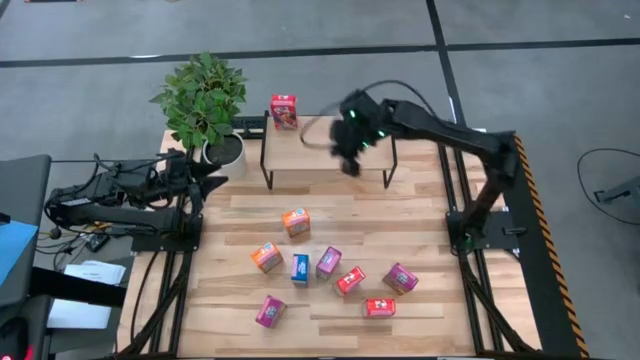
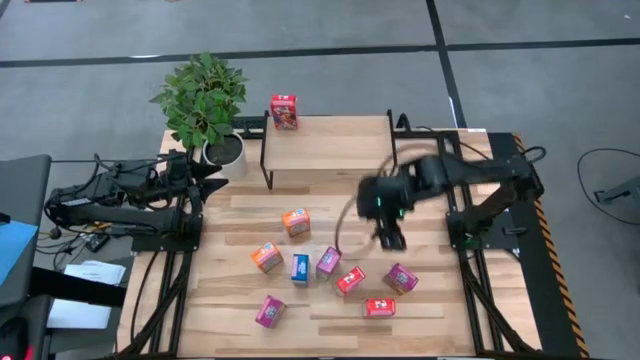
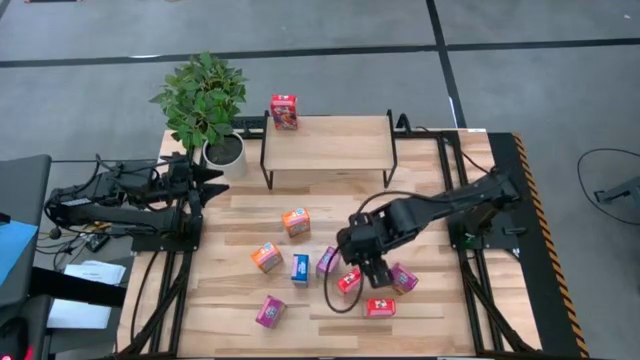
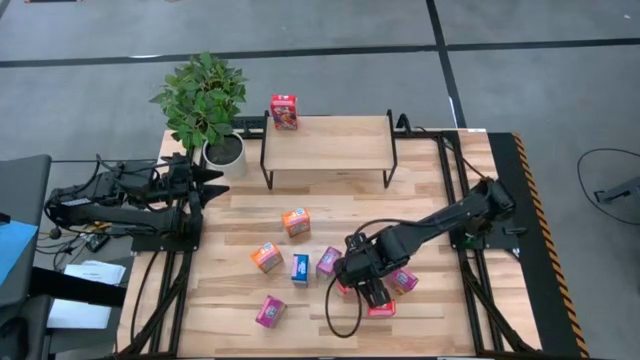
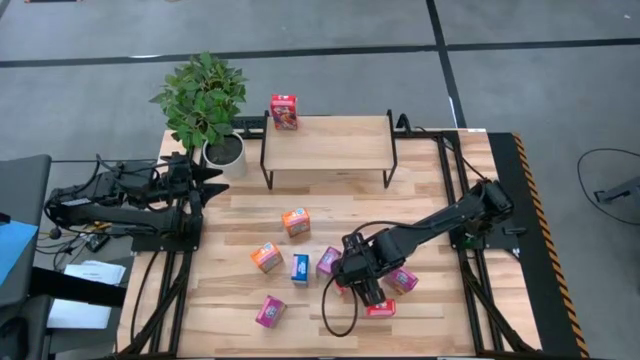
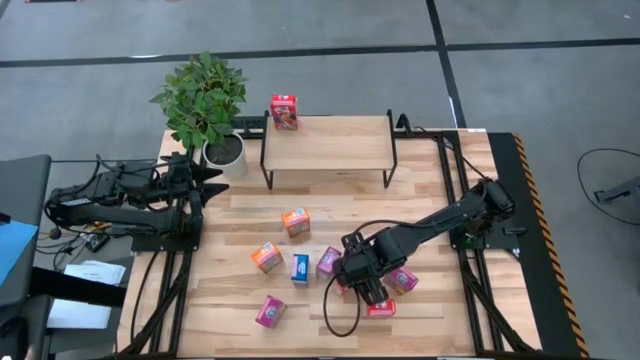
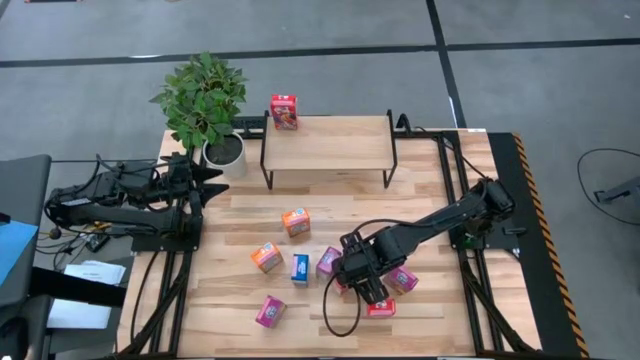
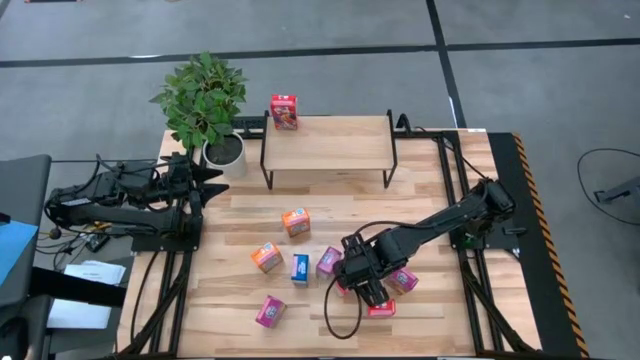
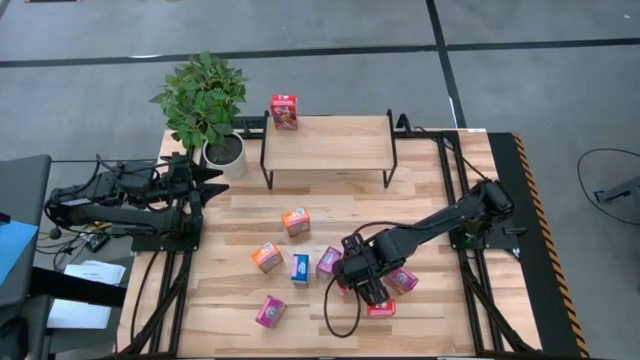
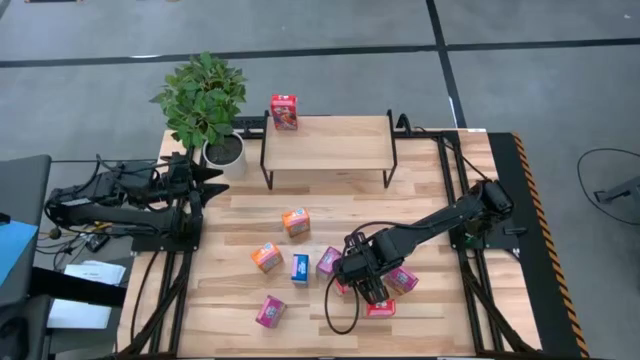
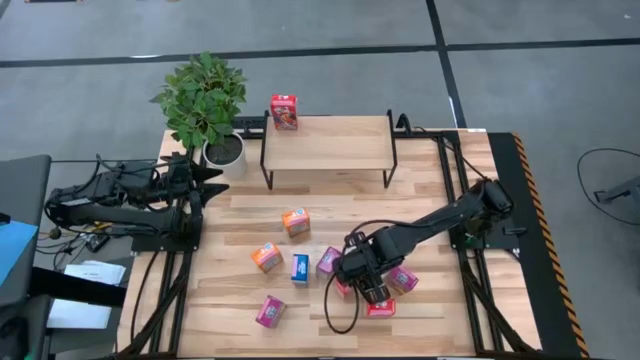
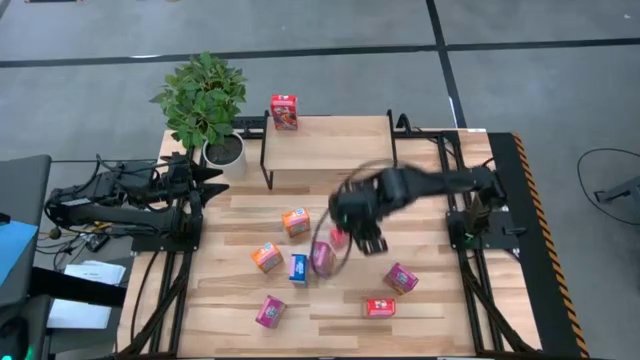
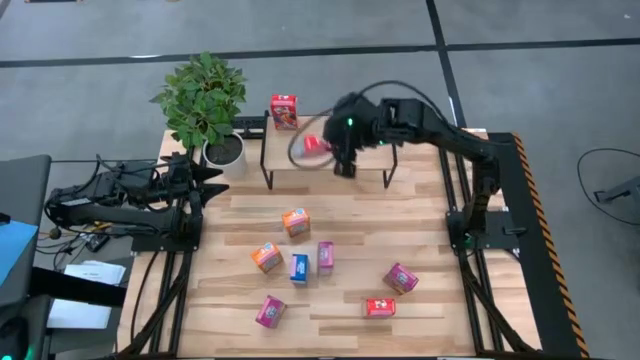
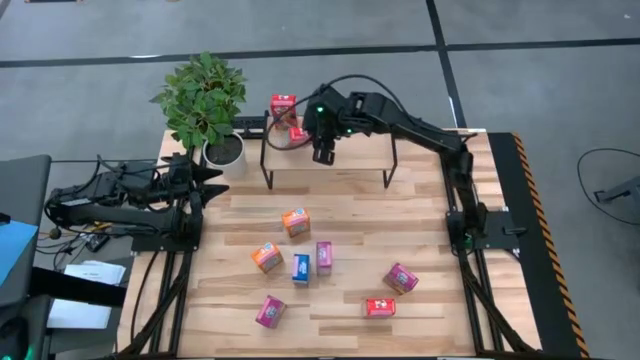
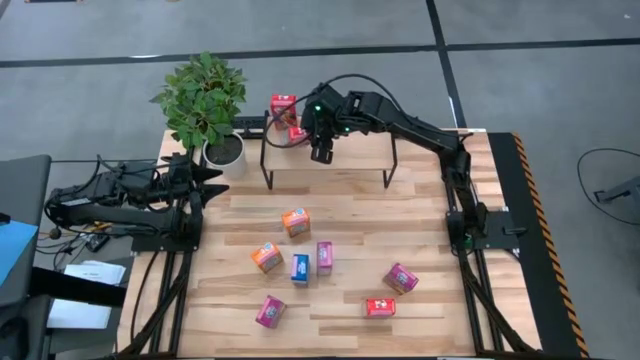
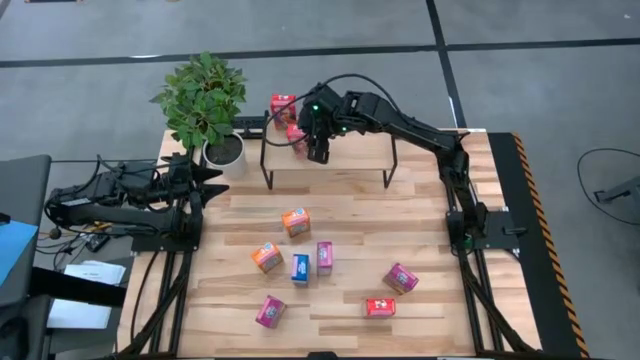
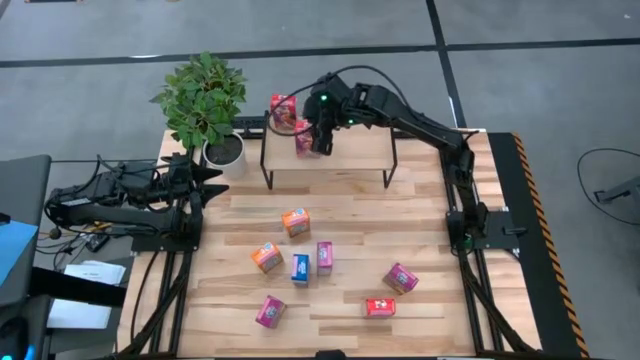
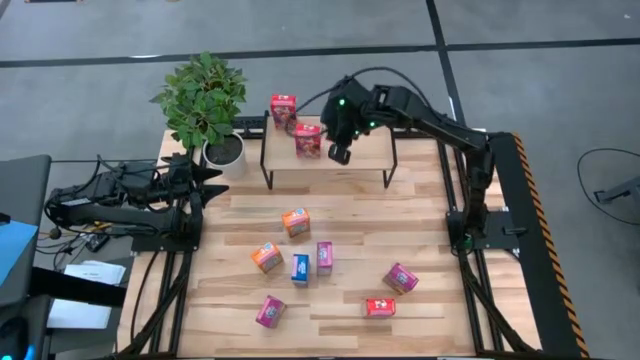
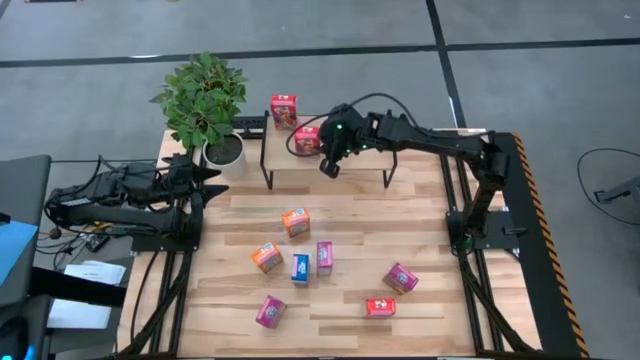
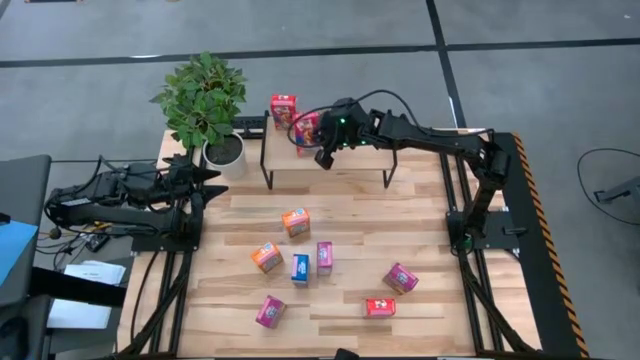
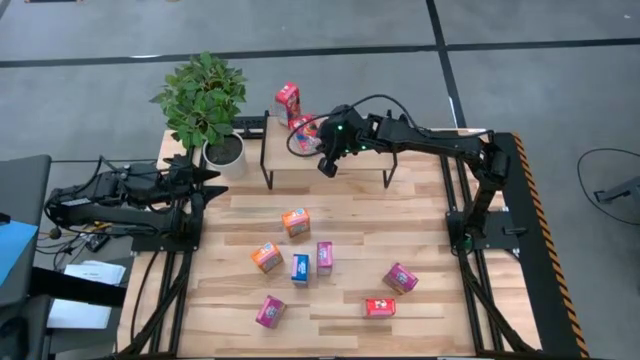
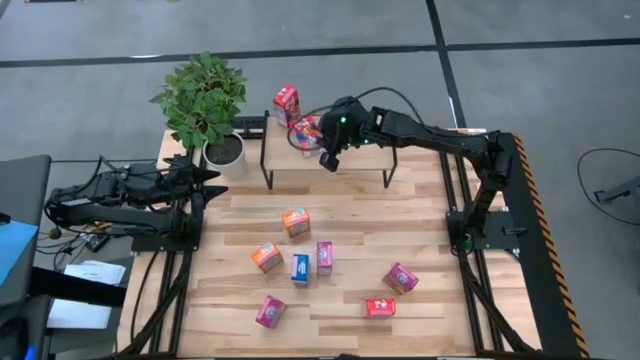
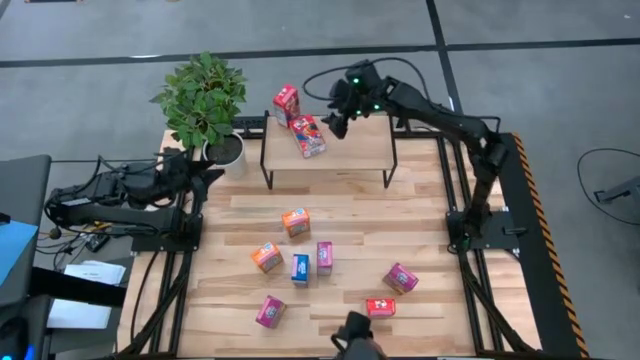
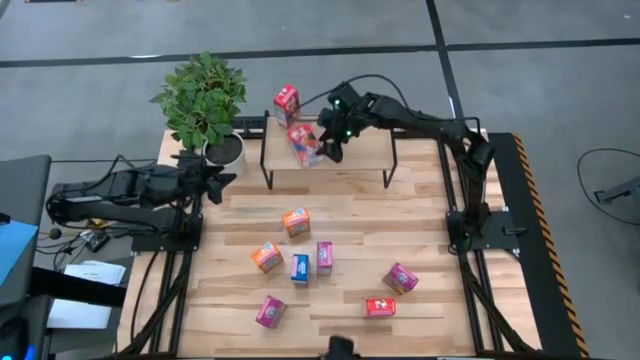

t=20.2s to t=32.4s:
Task: Stack cereal on shelf
Put the top red cereal box on the shelf aligned with the other red cereal box on the shelf

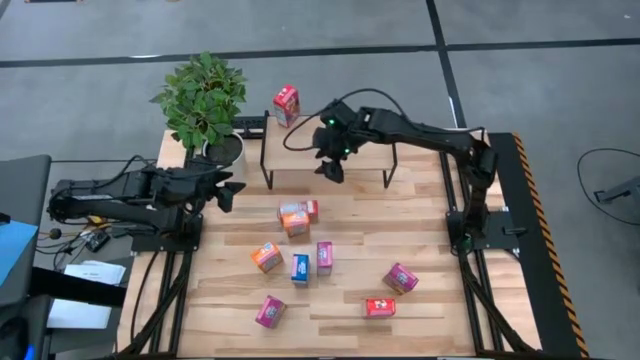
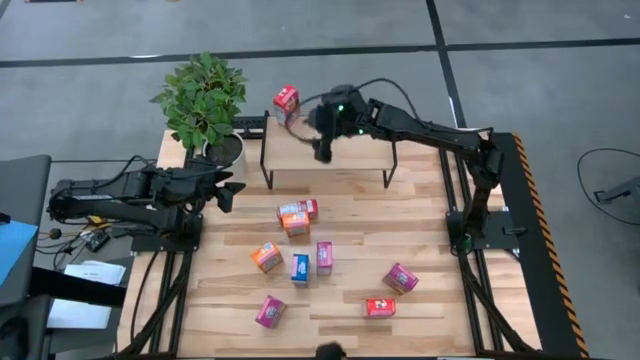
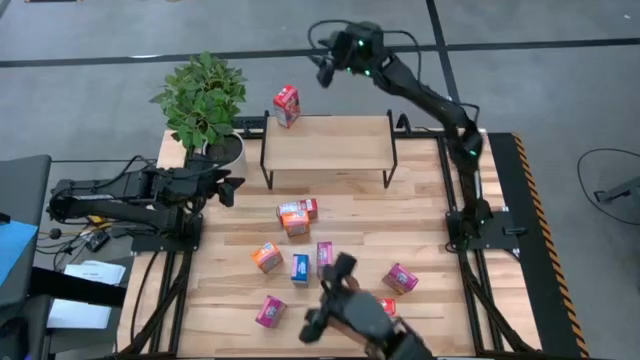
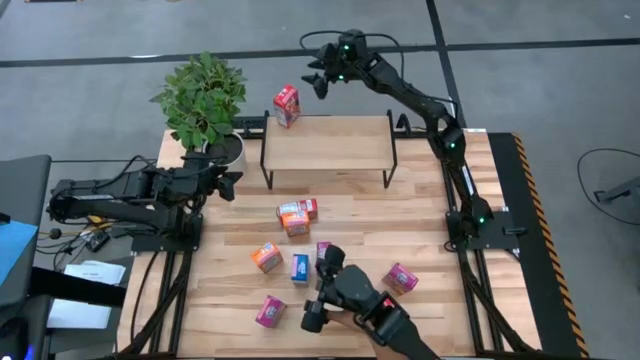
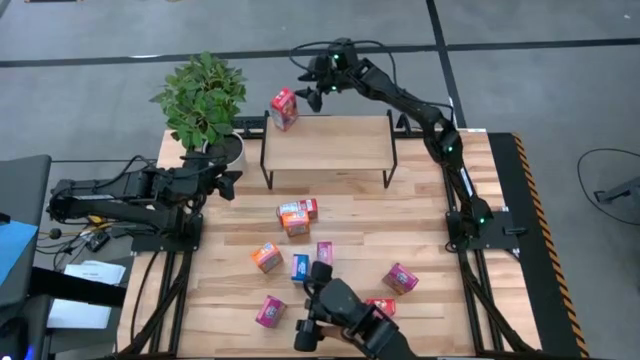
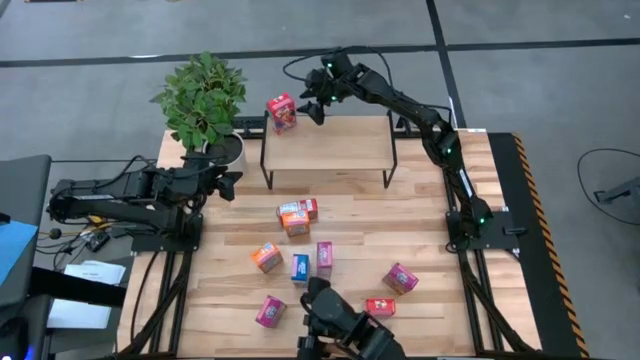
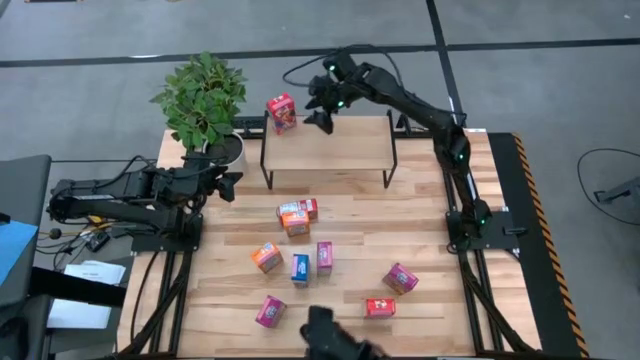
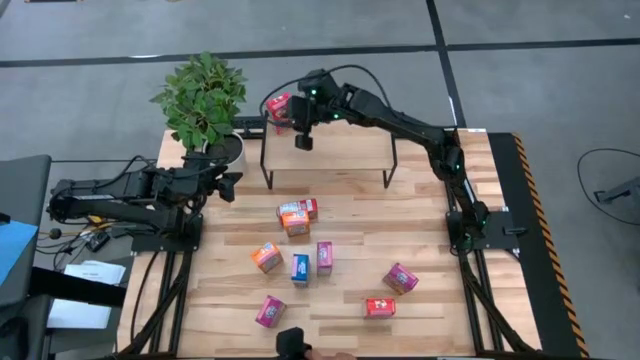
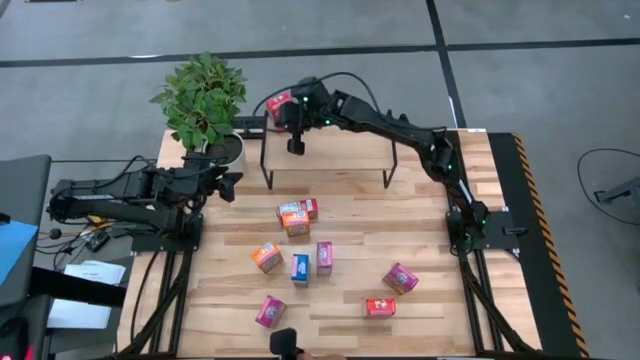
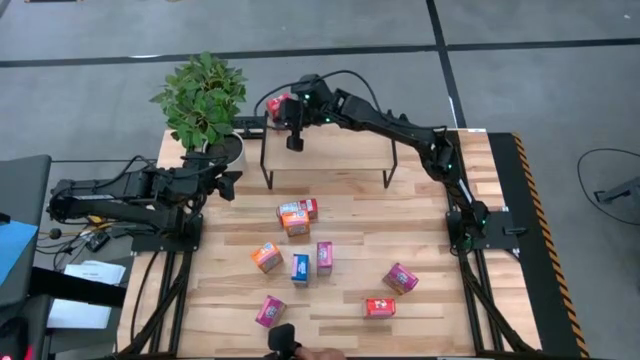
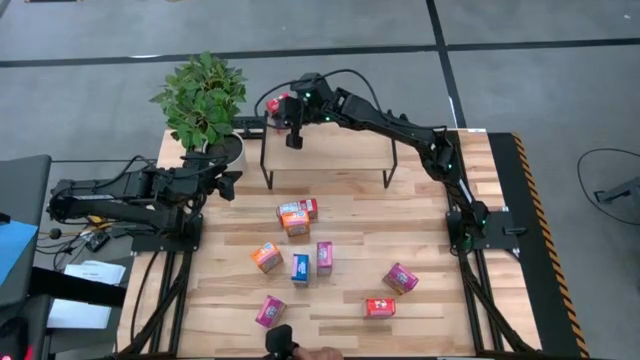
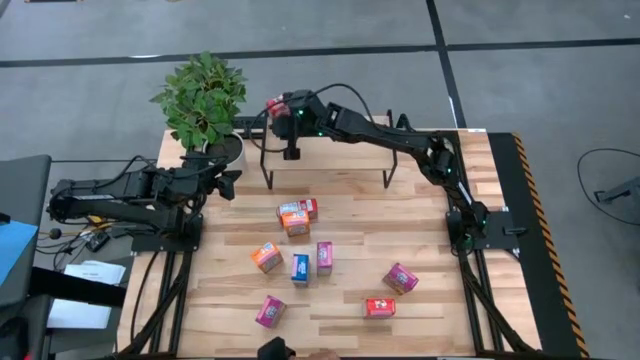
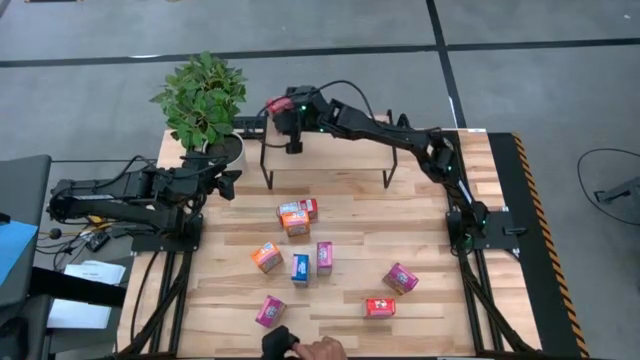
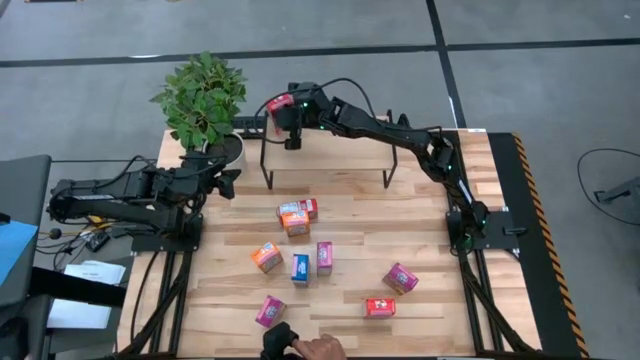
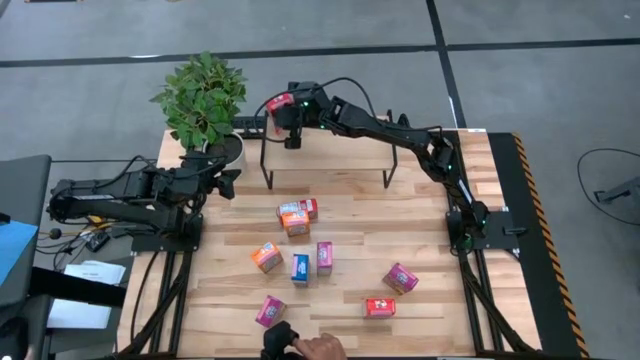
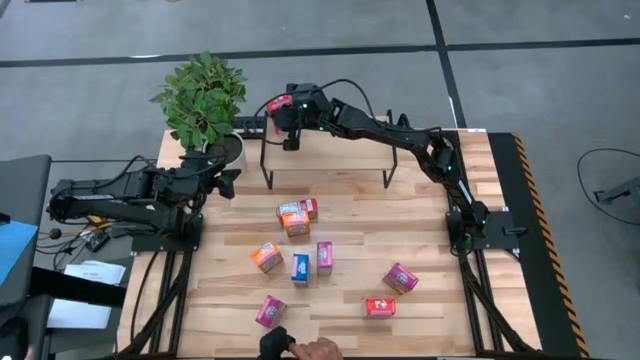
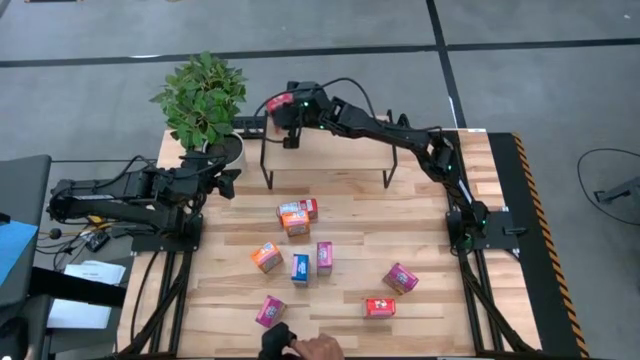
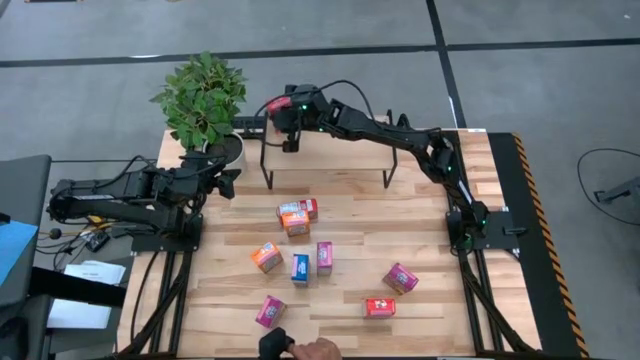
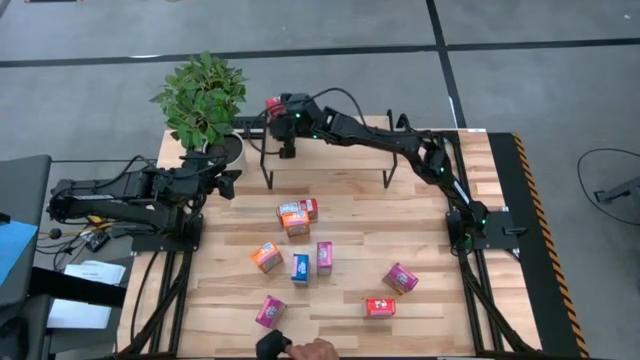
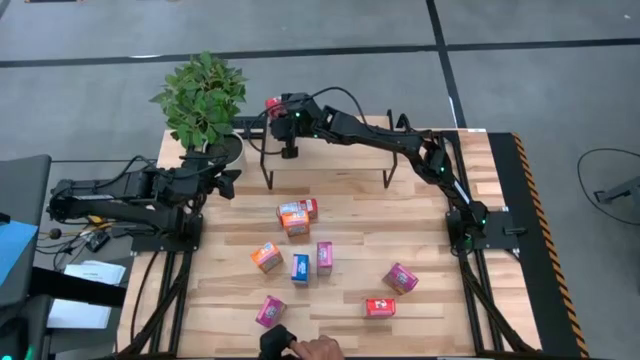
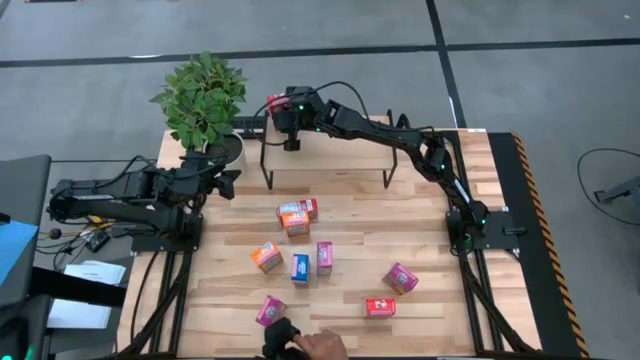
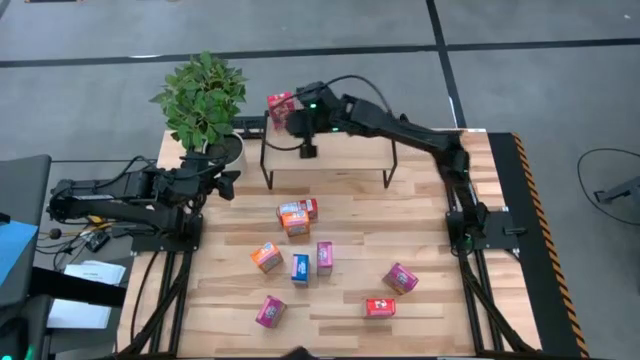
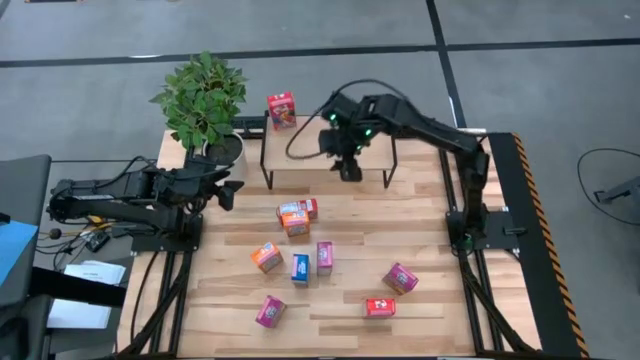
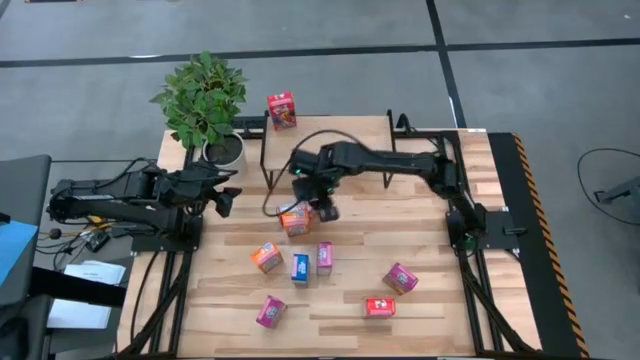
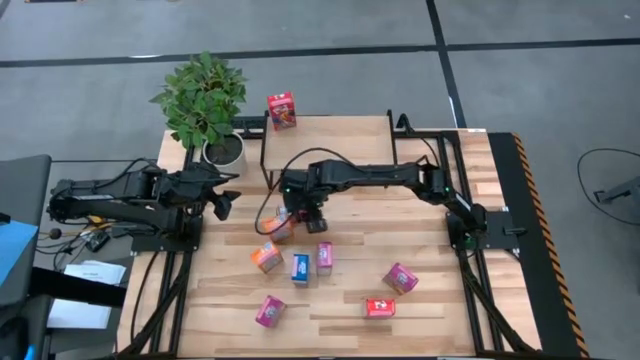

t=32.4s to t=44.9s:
Put the top red cereal box on the shelf aligned with the other red cereal box on the shelf
